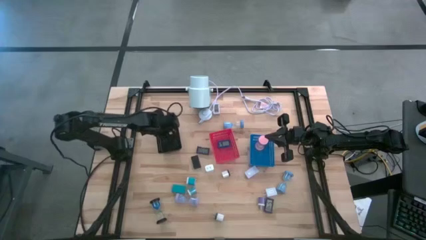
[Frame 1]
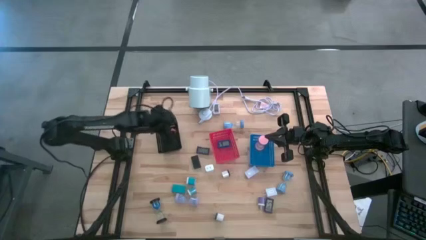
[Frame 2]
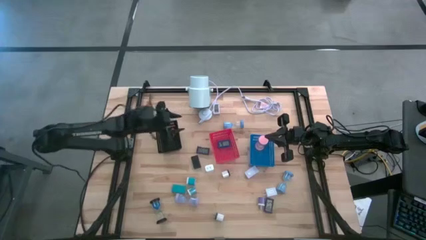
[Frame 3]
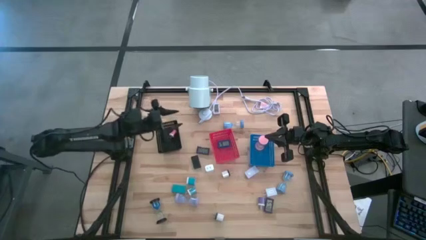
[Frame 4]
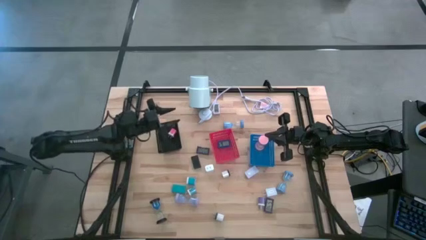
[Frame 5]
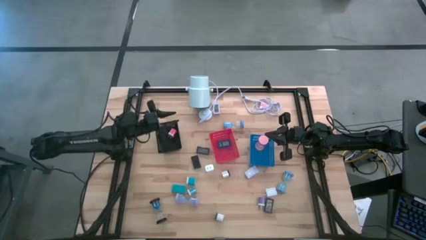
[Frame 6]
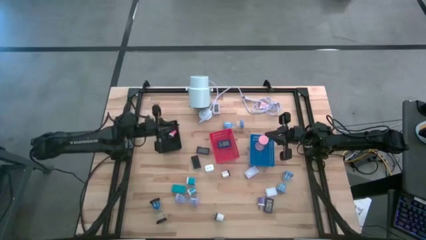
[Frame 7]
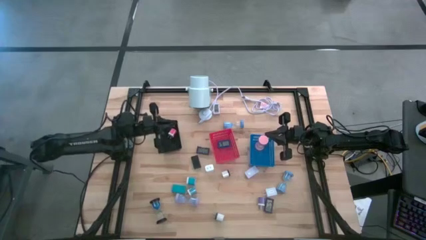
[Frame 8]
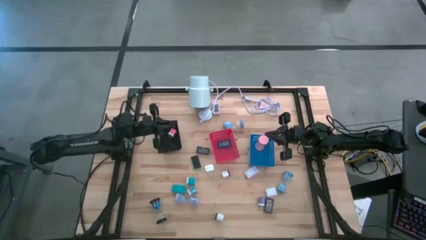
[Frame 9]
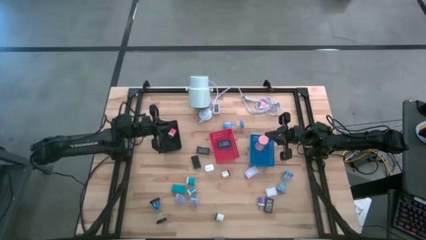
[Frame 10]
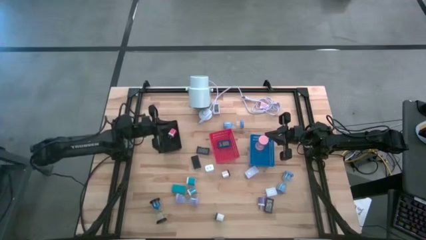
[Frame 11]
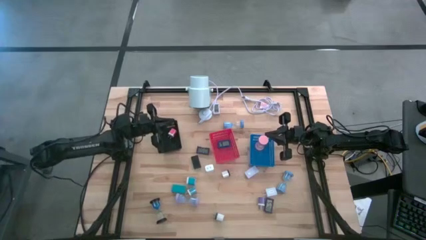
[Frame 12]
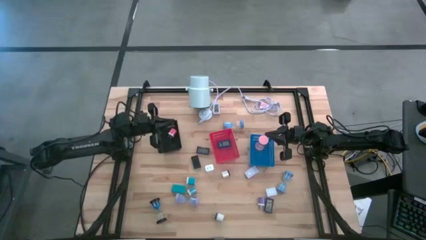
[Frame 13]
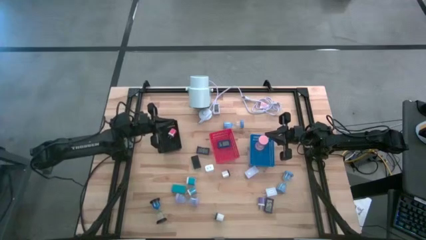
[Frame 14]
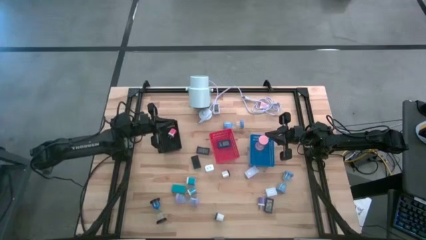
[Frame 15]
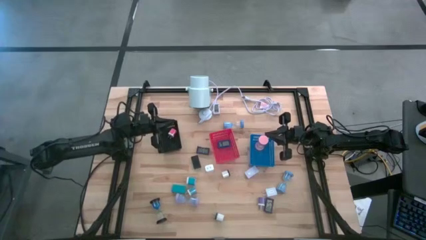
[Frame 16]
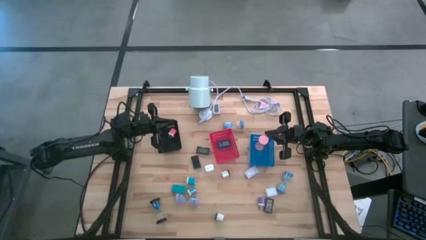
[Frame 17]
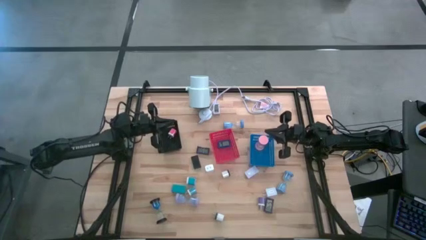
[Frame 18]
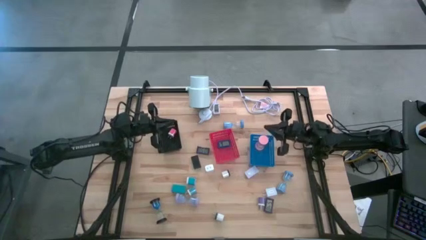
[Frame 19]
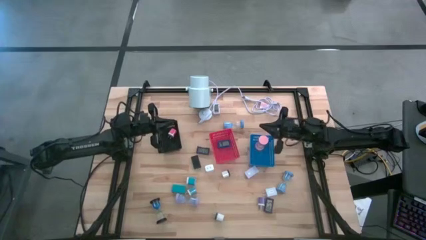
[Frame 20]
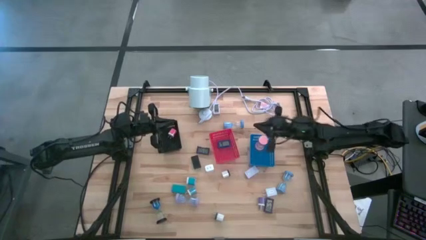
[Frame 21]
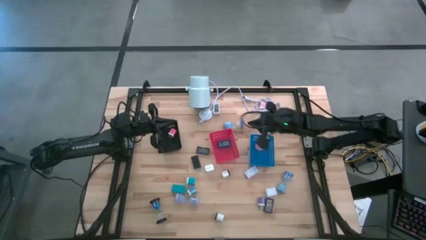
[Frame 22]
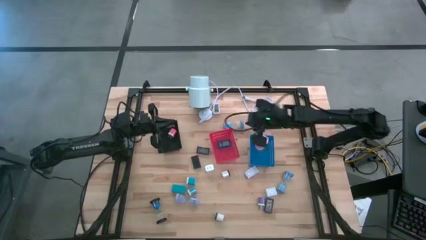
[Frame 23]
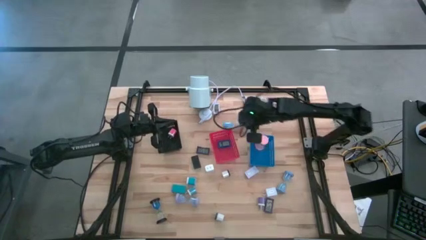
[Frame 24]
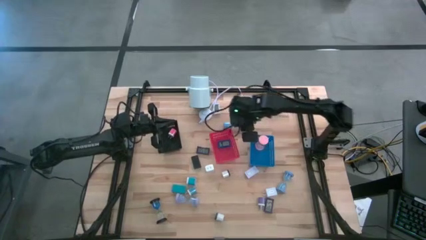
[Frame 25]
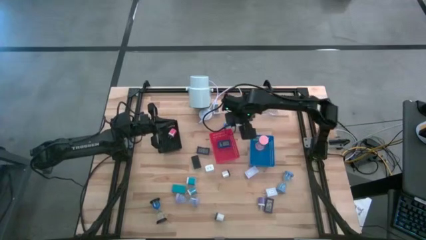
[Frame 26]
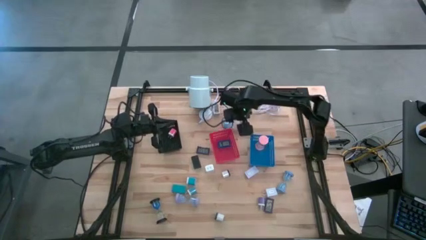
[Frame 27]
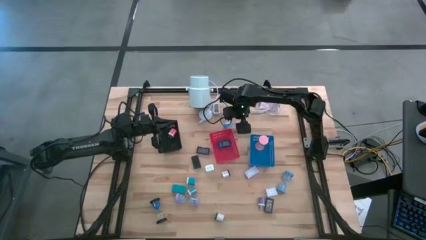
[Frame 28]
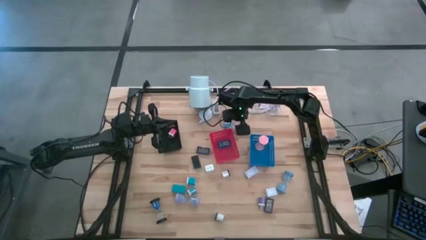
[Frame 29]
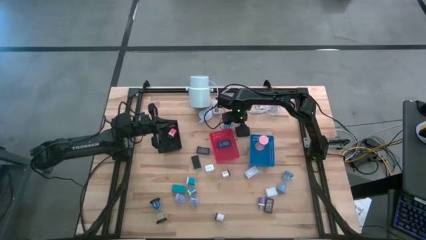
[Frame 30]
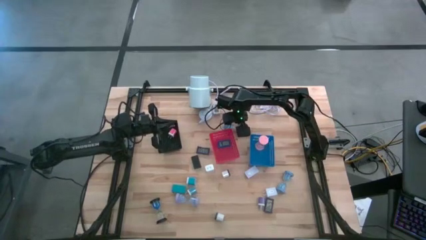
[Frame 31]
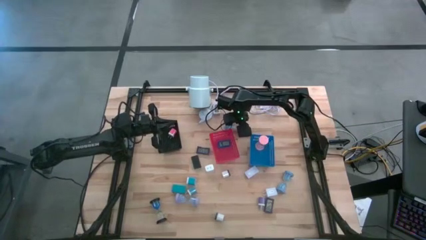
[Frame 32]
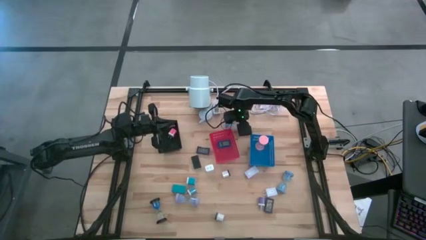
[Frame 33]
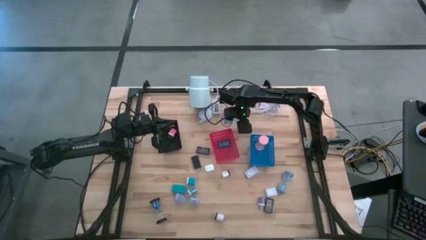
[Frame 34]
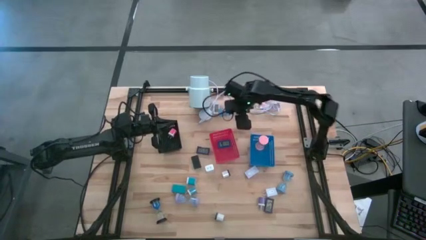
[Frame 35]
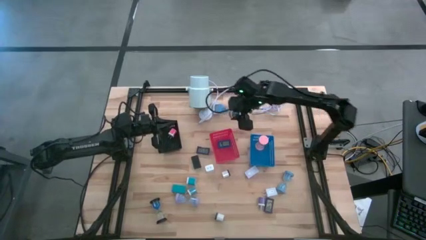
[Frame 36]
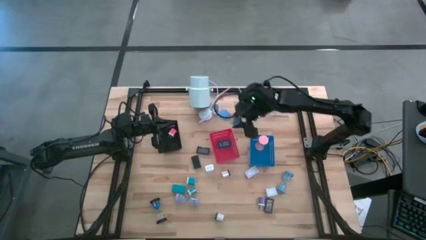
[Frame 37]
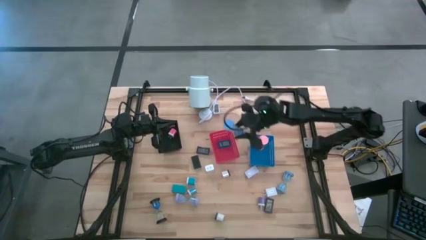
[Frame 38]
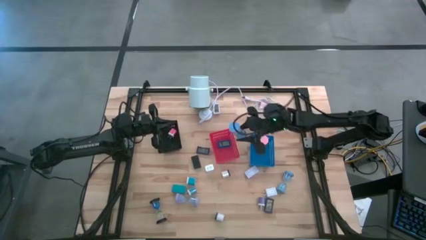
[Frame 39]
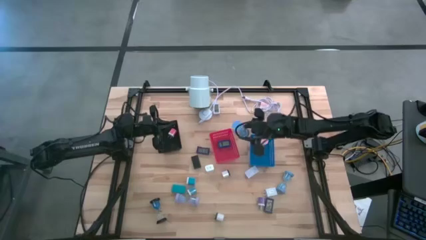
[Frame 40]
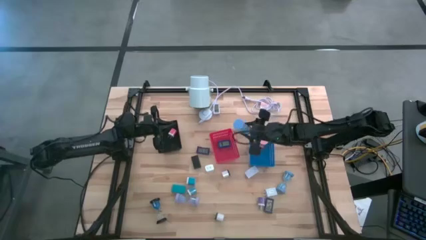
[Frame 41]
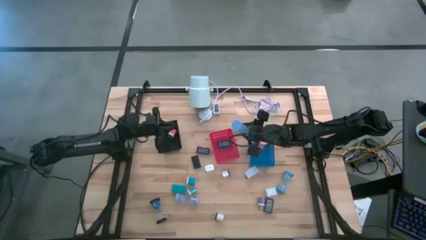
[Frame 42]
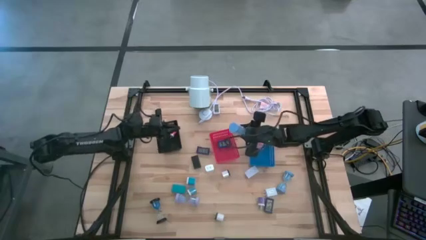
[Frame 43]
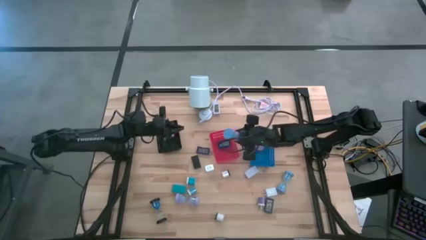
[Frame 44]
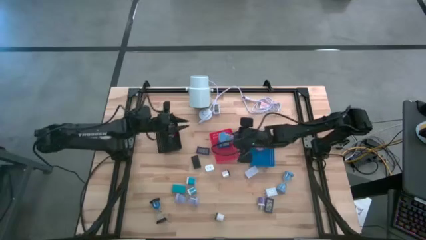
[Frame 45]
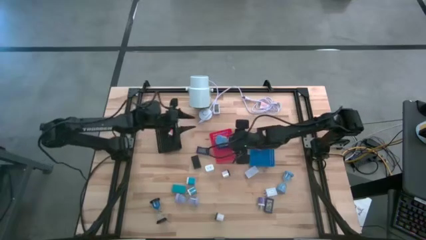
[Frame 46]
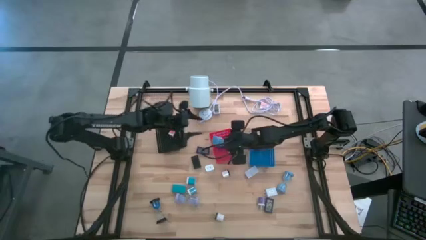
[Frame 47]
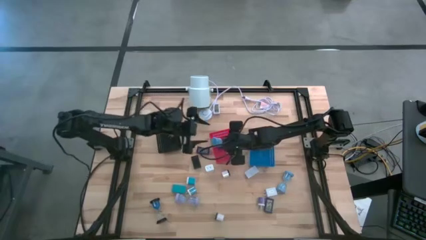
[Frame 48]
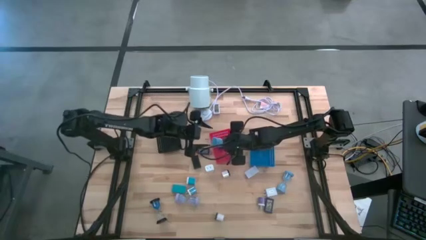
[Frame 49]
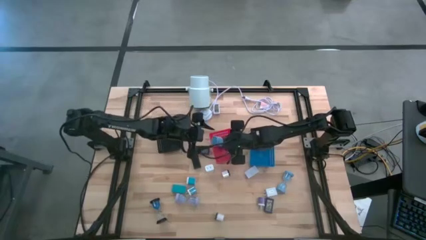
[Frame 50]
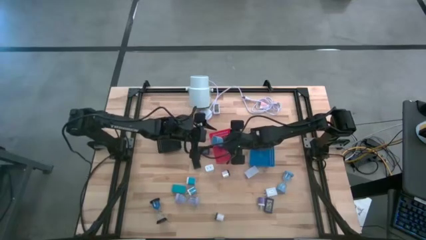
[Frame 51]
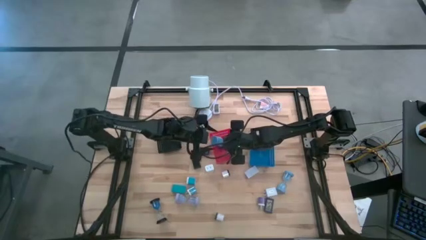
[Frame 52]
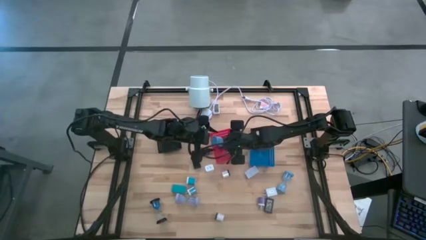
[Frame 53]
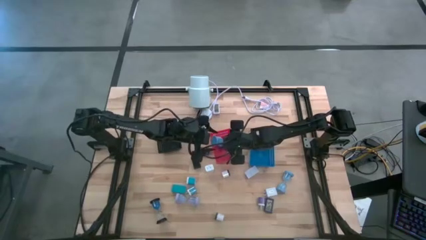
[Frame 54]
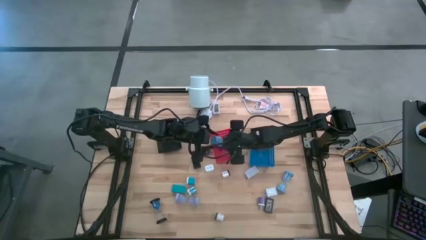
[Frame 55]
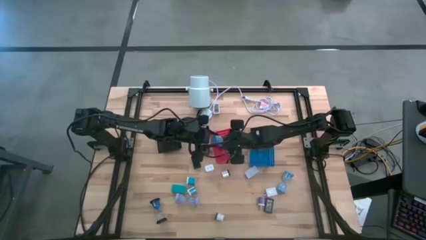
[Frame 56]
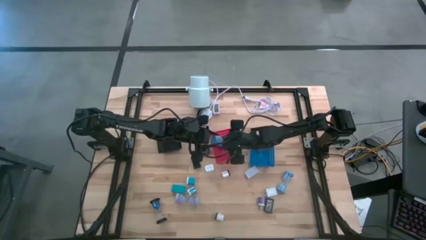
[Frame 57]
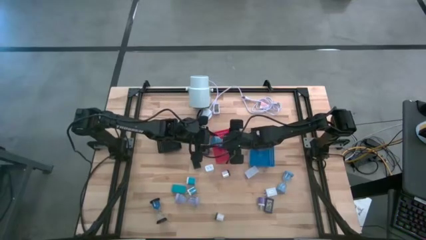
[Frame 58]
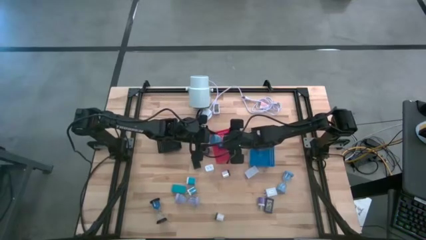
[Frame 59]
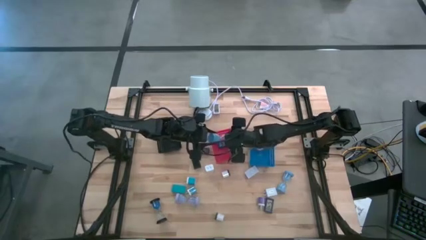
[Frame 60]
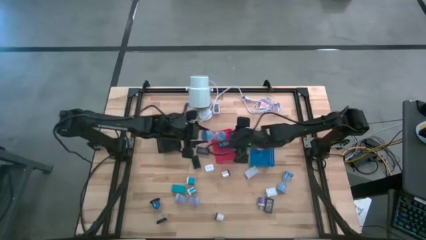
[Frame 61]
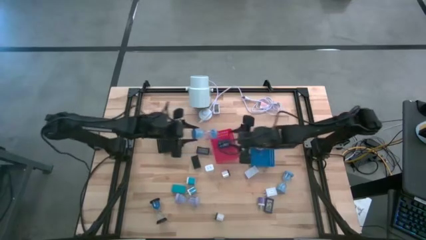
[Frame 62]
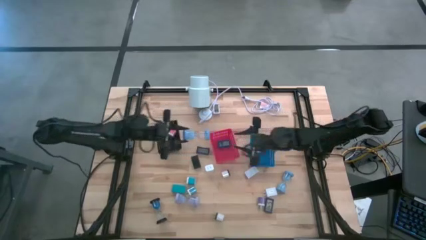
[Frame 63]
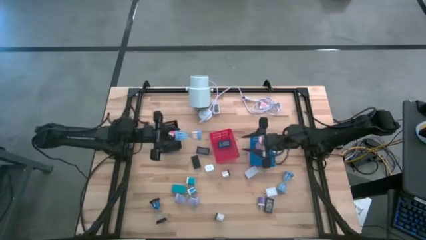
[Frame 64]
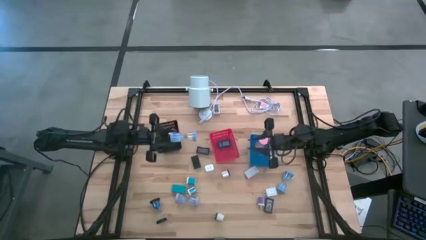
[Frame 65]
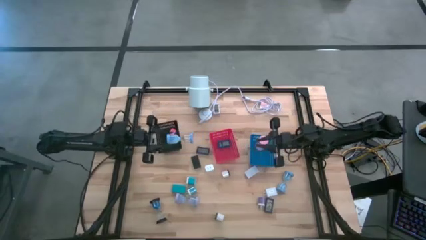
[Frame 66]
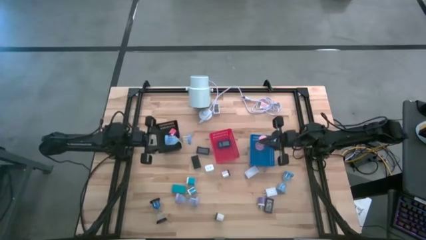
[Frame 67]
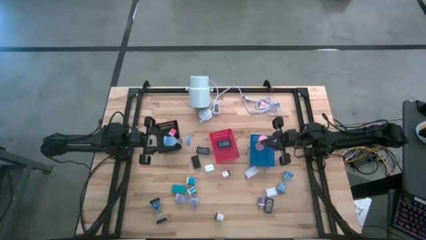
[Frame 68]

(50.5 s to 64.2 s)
Task: Pick & Place Office items
Put the top blue hourglass into the blue bin

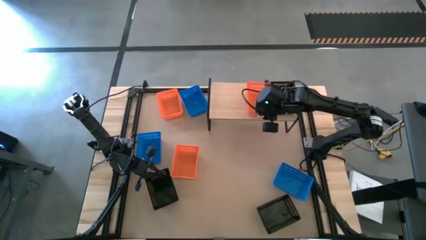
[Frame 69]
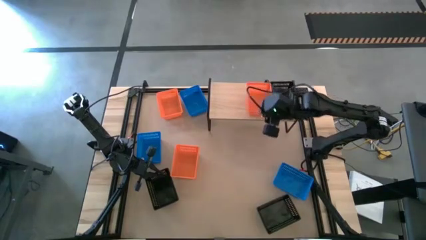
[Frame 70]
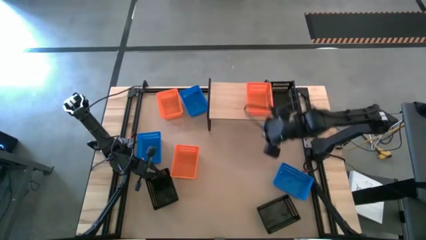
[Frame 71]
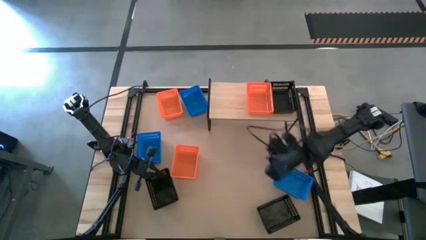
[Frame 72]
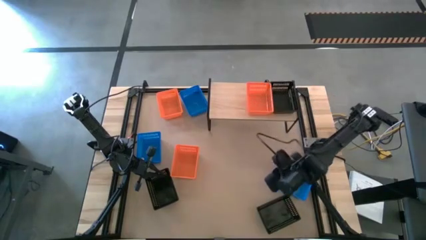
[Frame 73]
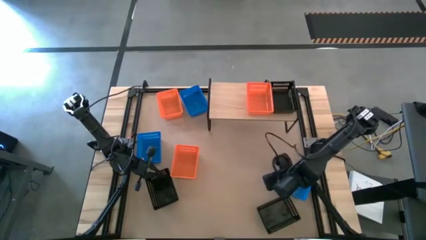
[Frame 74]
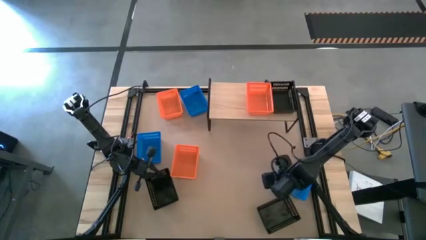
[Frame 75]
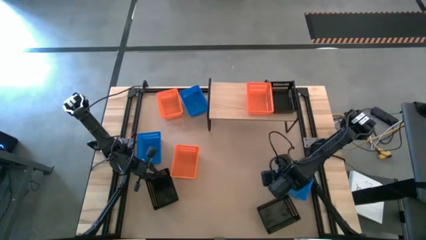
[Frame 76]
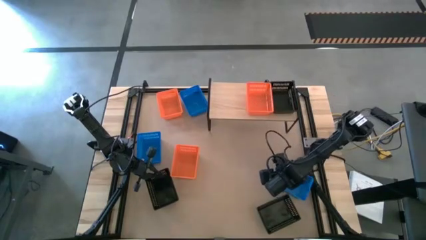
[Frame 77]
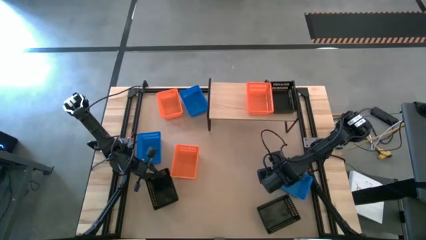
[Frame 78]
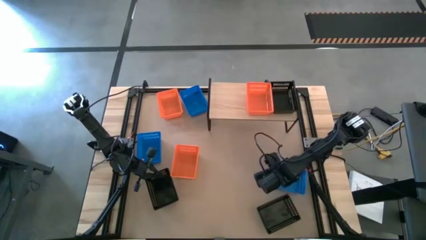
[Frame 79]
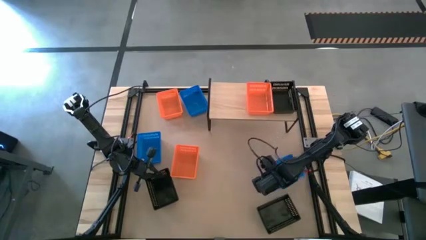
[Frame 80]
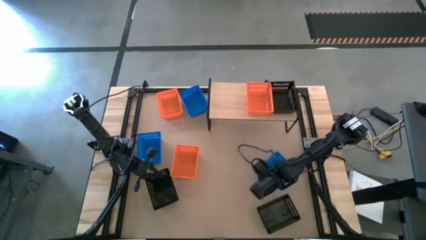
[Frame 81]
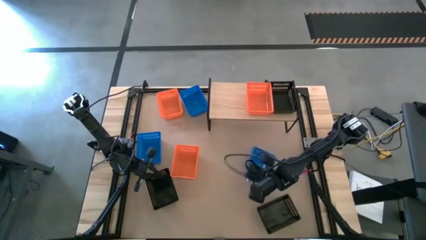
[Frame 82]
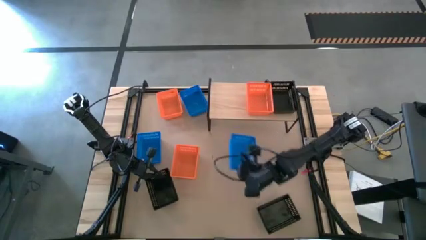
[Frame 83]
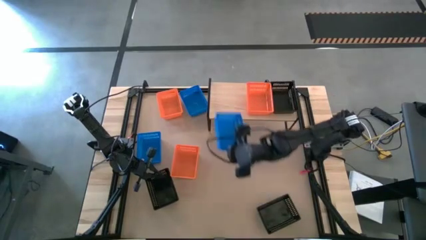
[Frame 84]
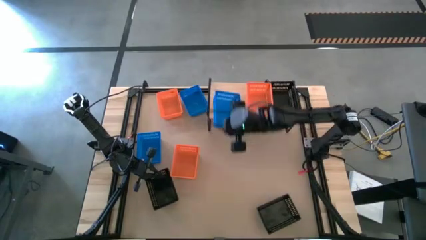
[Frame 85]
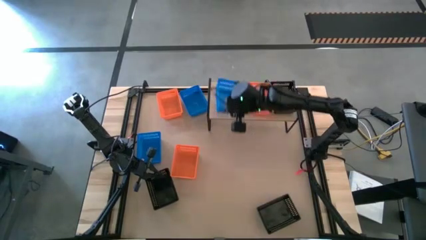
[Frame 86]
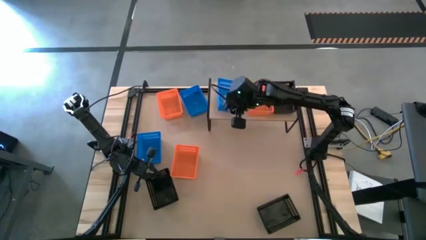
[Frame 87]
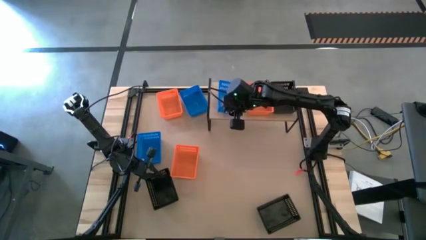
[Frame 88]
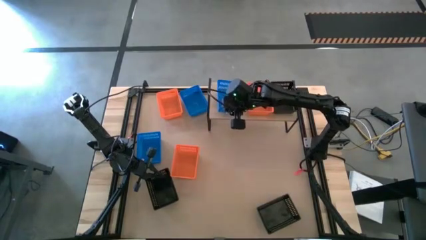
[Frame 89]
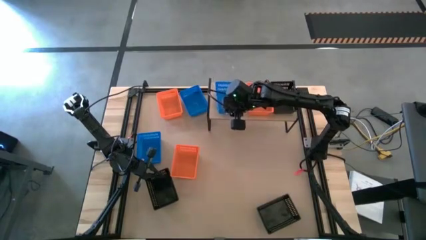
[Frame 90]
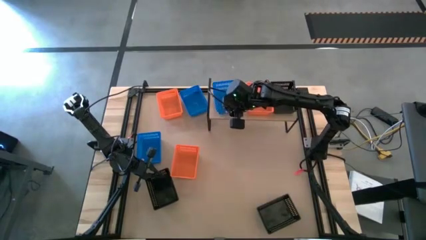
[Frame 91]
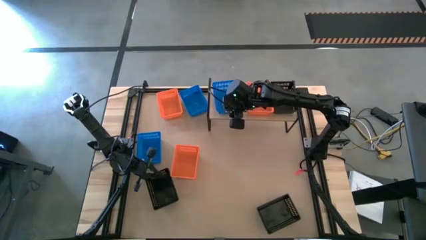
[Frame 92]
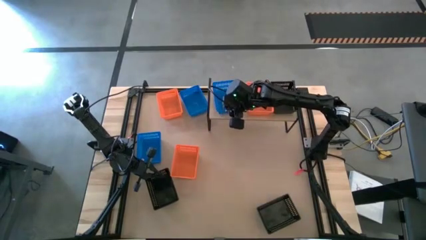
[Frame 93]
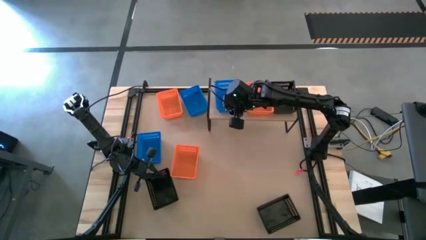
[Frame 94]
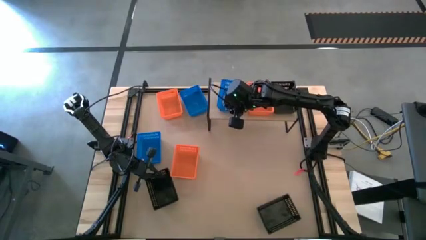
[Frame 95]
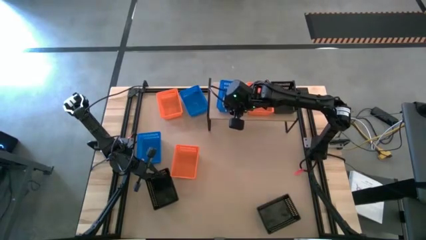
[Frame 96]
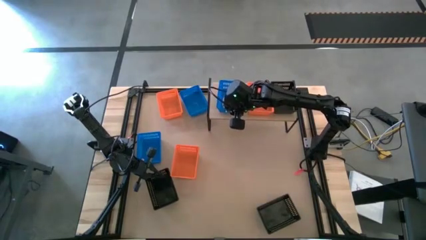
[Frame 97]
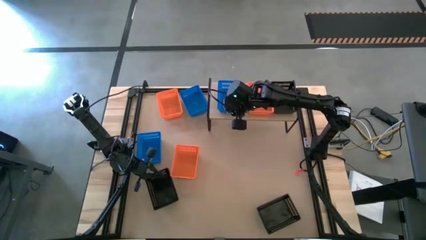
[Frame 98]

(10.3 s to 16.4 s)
Task: Stack baskets on shelf by color
Put the bottom blue bin on the shelf
